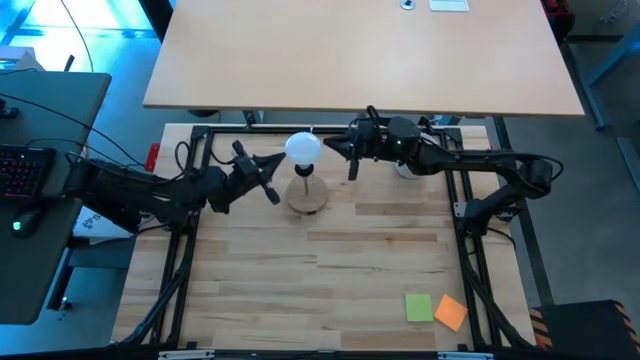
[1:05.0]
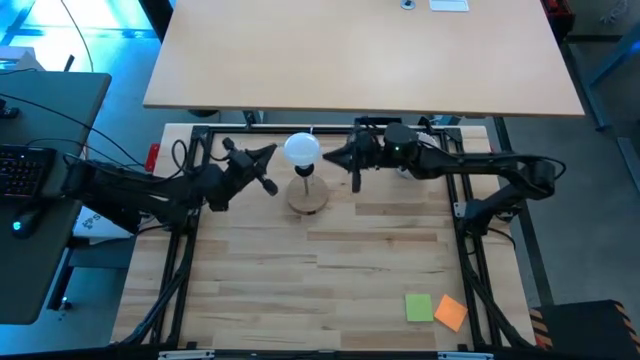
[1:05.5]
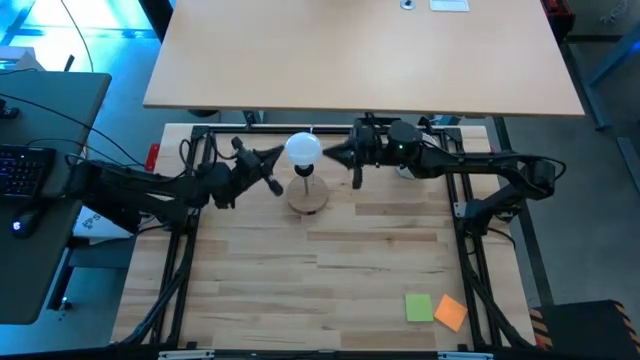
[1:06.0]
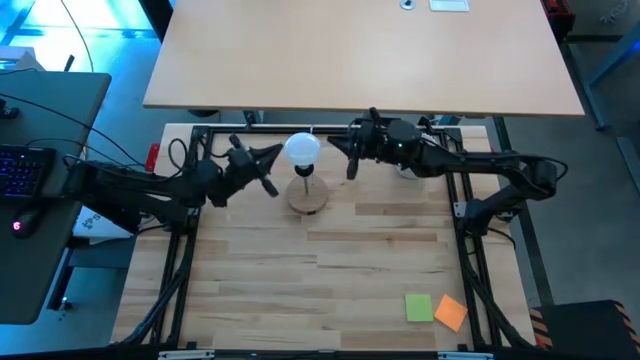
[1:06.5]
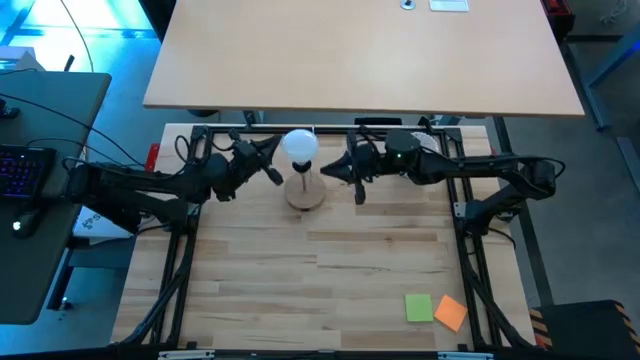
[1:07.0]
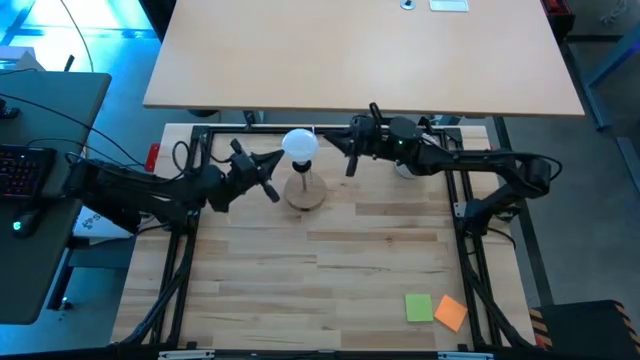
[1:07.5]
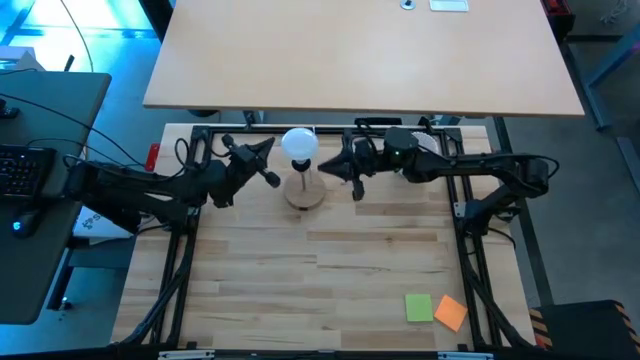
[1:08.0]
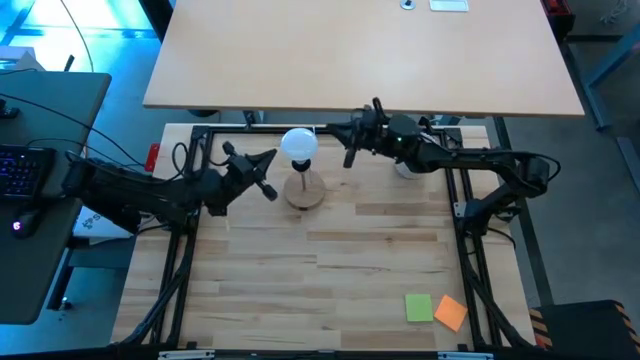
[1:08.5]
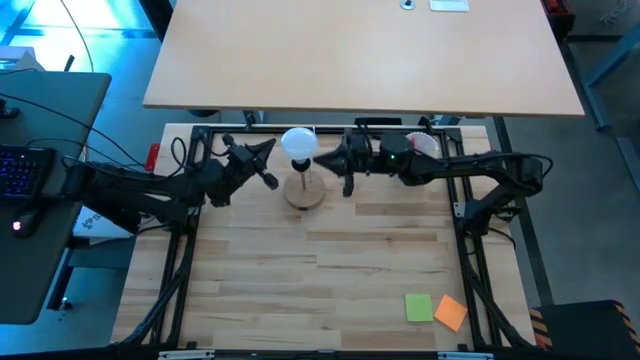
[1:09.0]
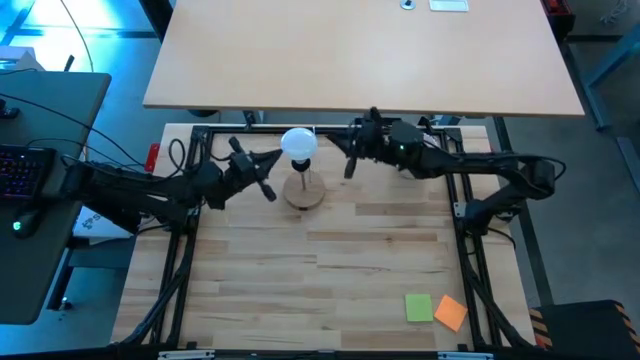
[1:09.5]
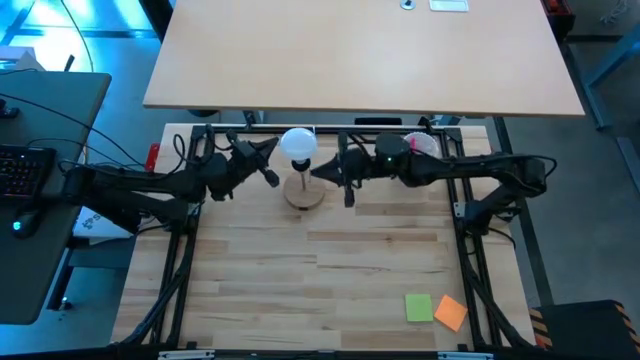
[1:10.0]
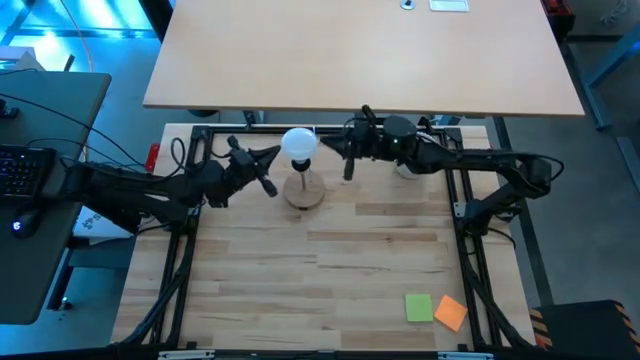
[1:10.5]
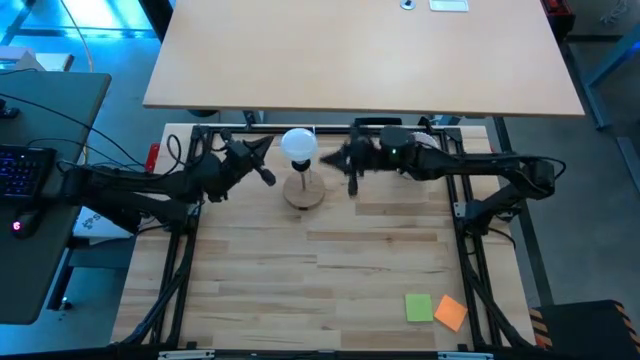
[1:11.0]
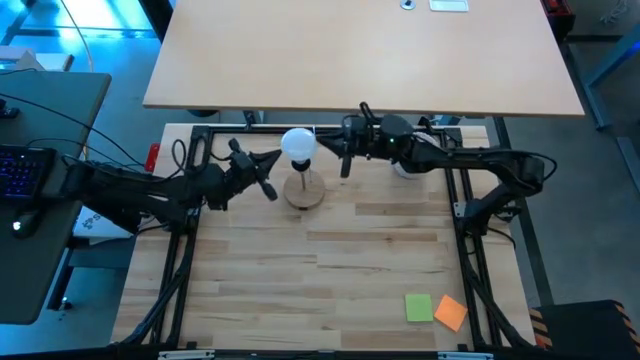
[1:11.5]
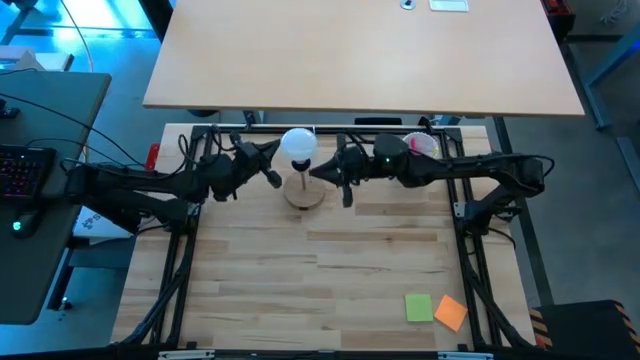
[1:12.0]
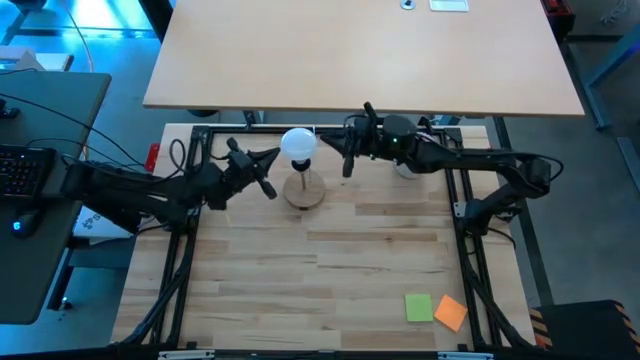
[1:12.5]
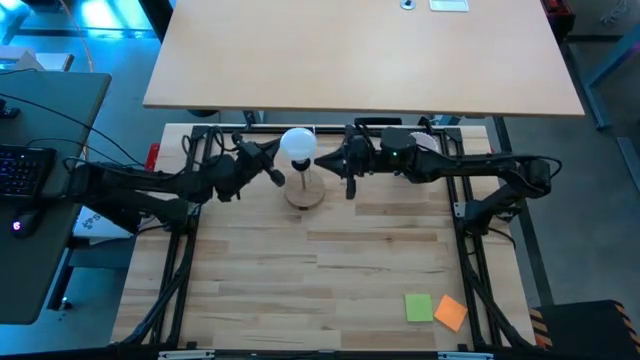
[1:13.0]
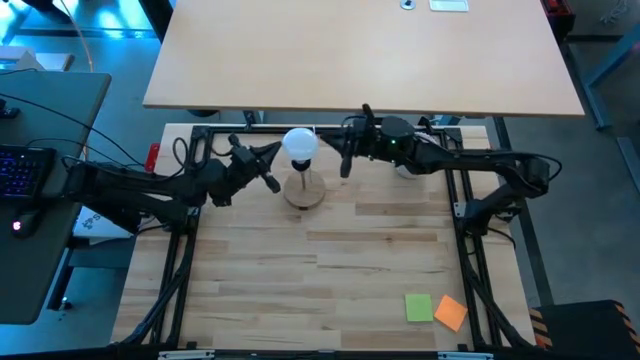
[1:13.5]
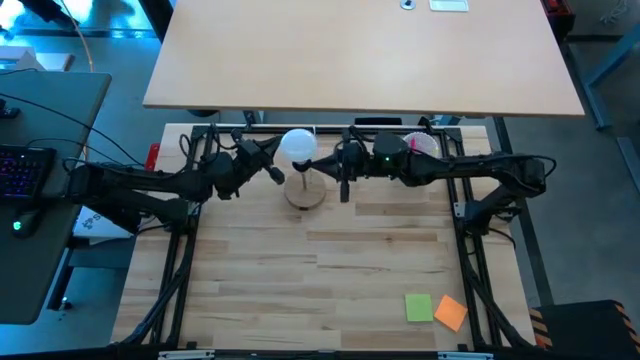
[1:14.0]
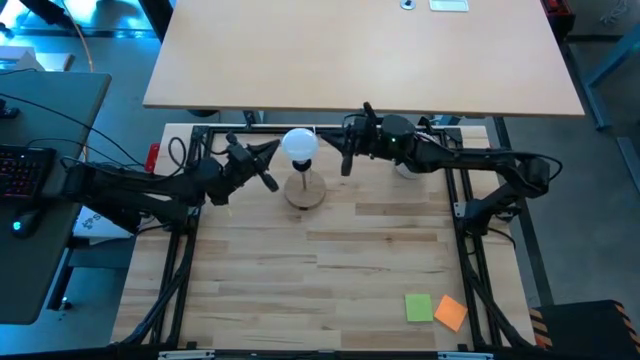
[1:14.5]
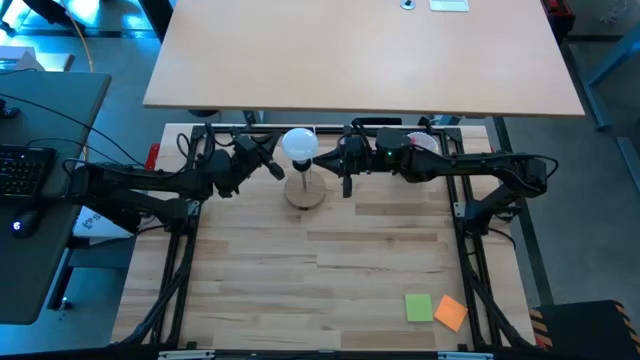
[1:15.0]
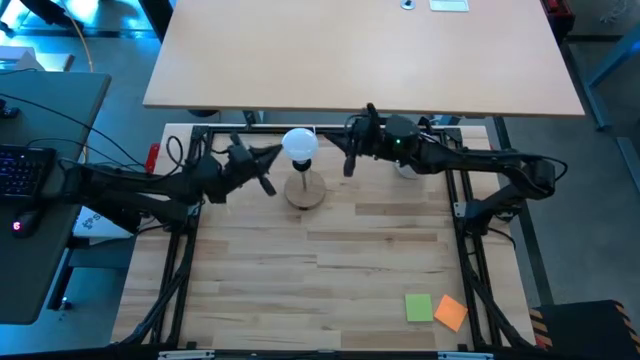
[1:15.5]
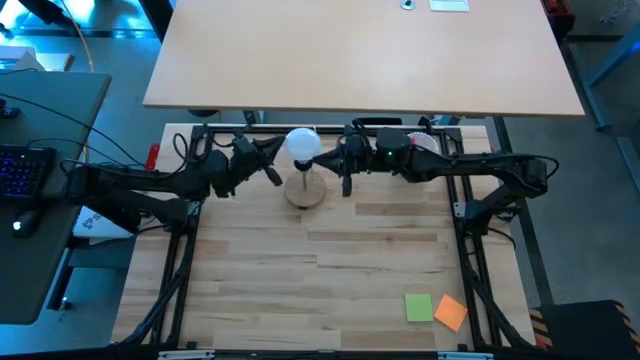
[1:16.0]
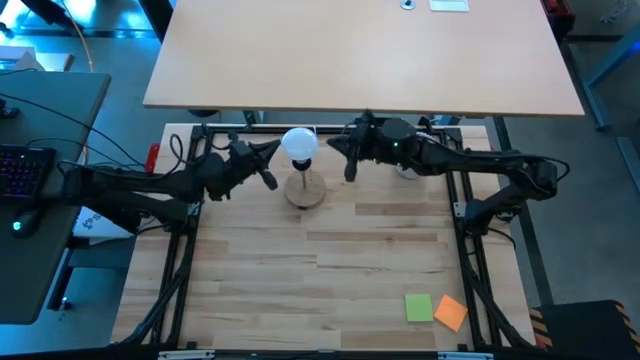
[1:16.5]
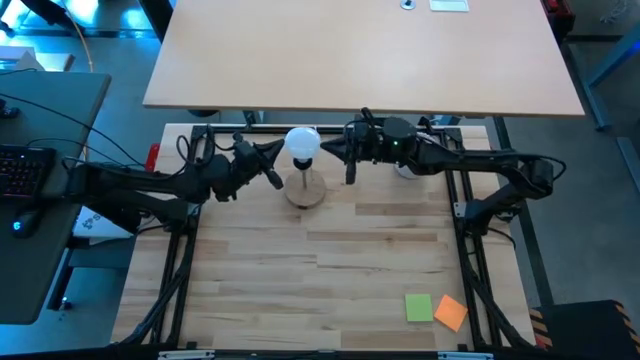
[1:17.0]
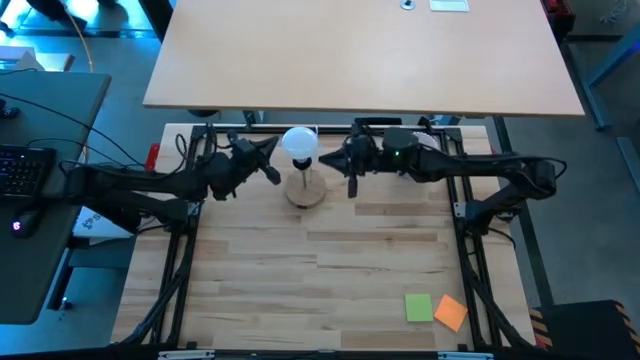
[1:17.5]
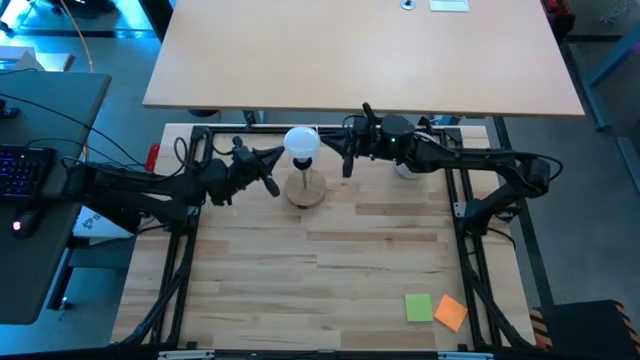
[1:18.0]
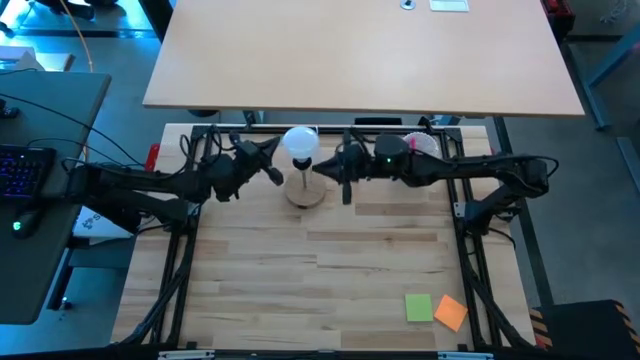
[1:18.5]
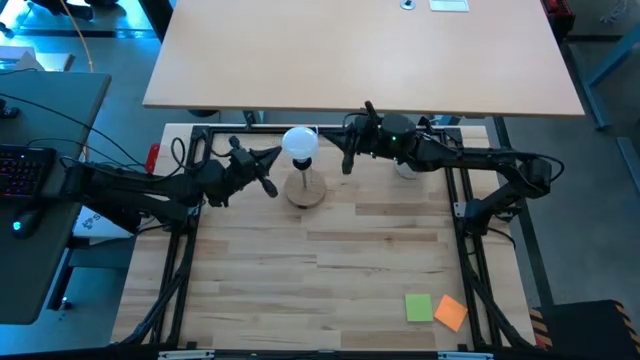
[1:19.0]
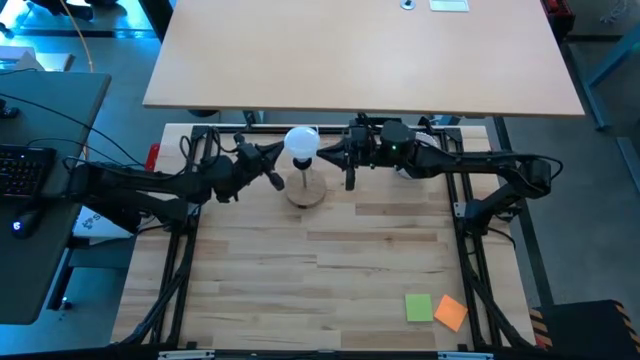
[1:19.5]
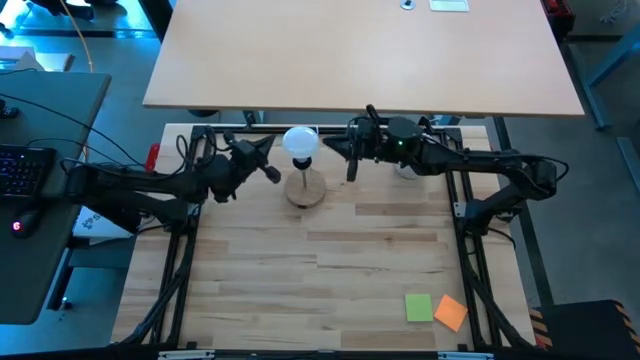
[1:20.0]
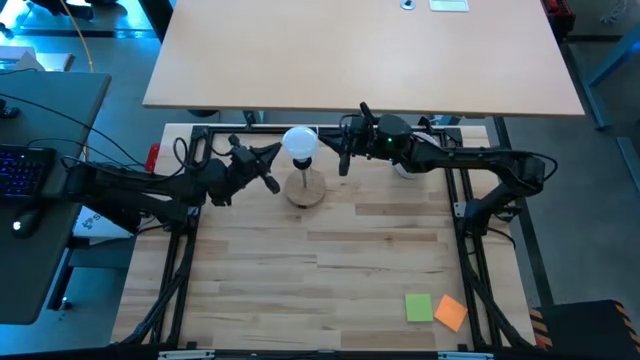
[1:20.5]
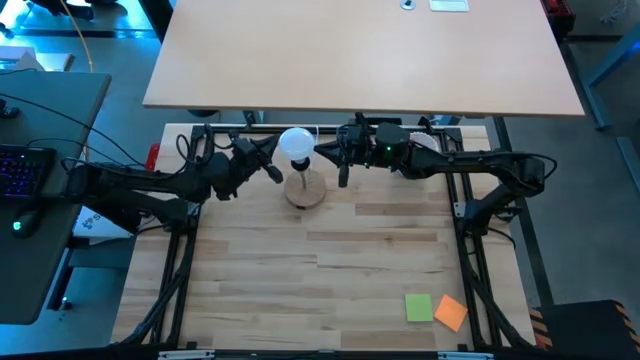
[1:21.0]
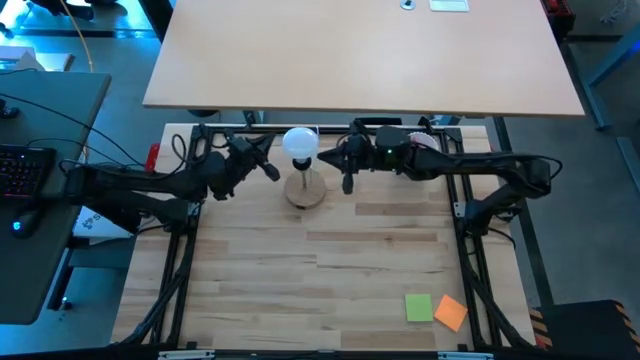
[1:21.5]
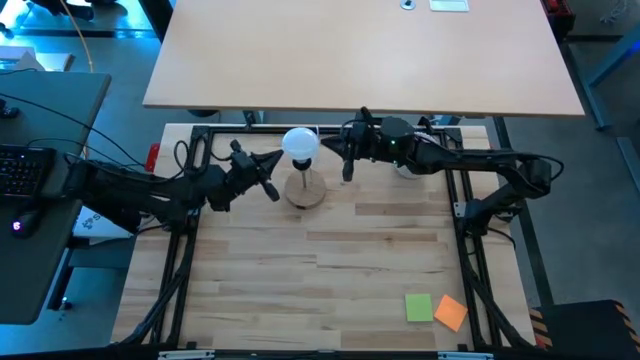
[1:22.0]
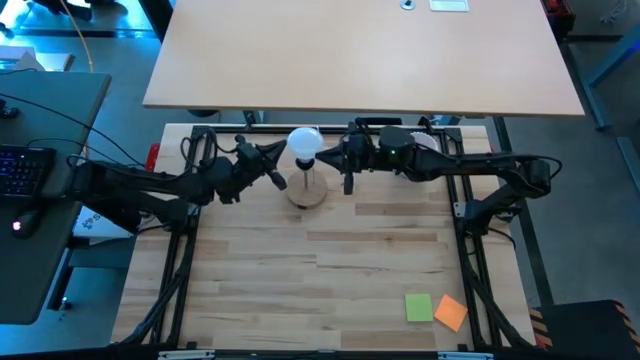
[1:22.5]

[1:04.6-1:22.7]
Task: Screw lightbulb
Insert the lightbulb into the brown lamp

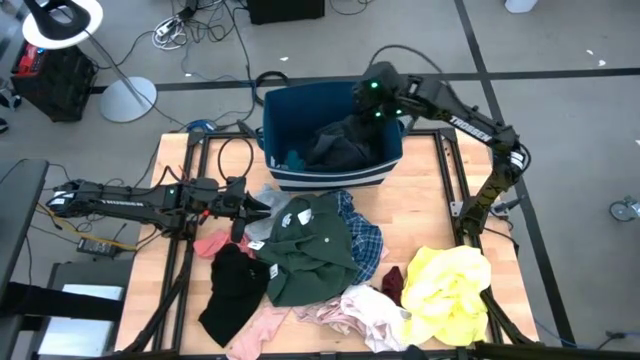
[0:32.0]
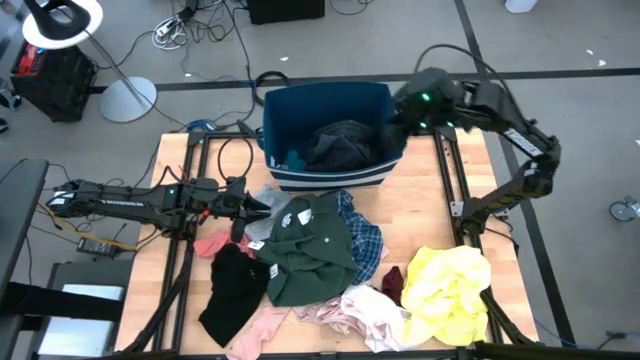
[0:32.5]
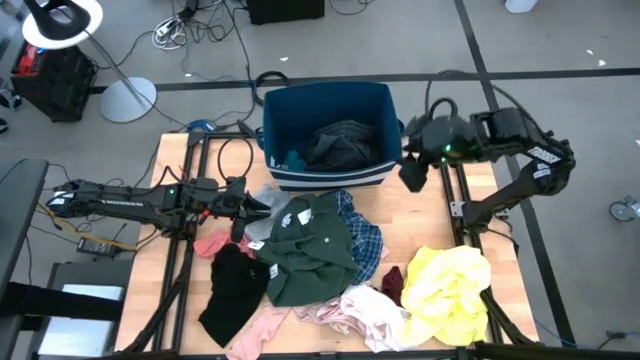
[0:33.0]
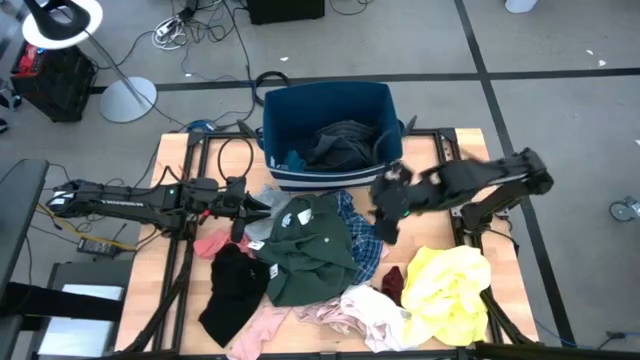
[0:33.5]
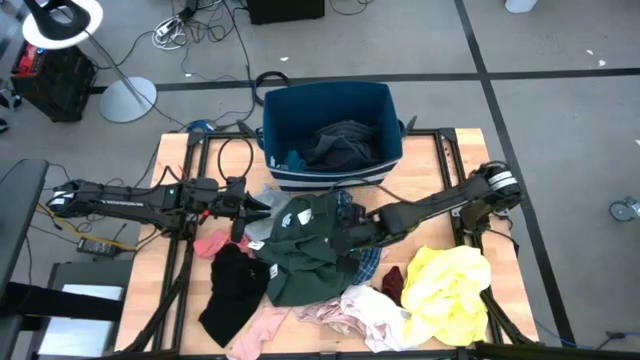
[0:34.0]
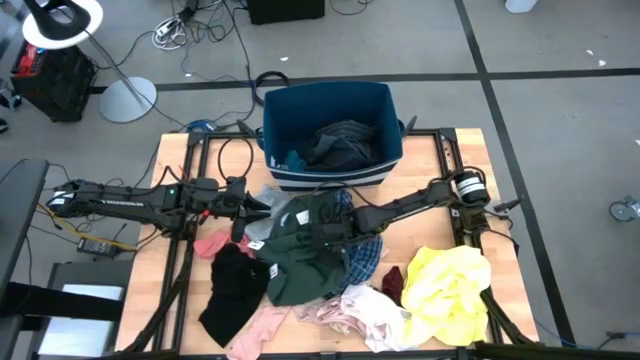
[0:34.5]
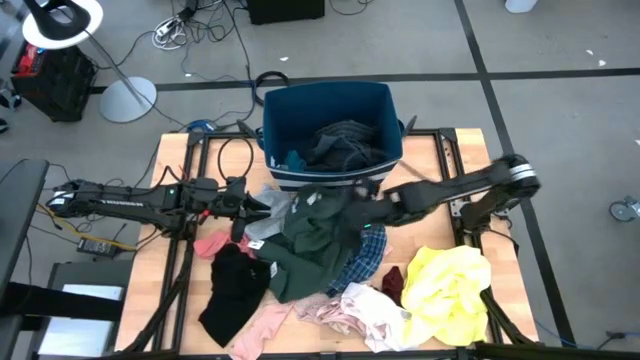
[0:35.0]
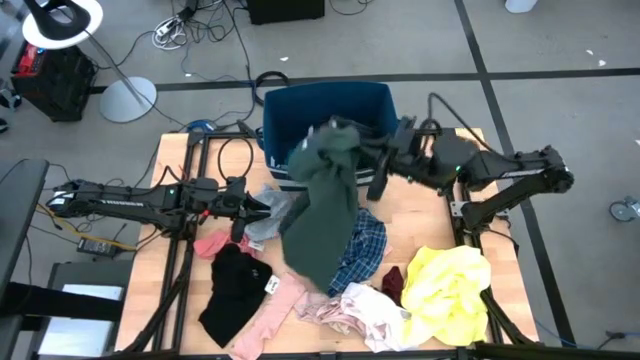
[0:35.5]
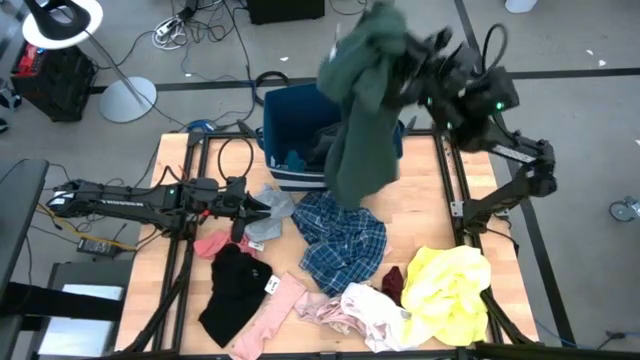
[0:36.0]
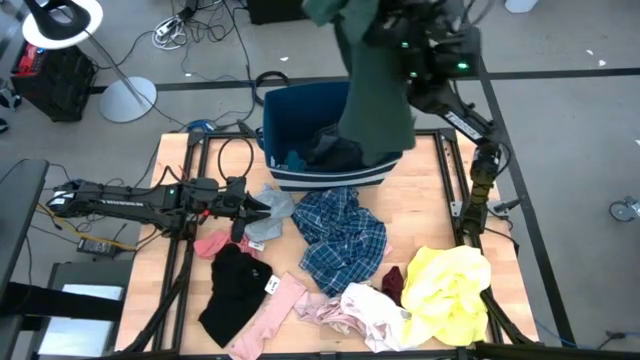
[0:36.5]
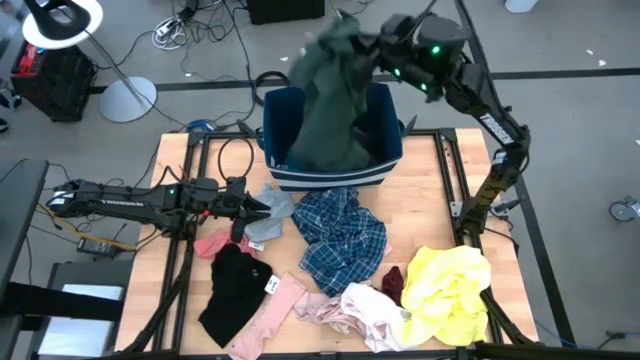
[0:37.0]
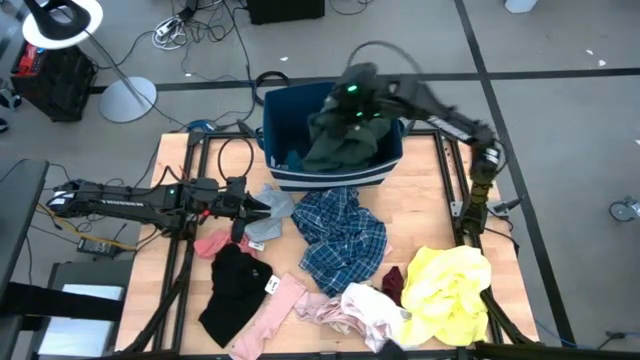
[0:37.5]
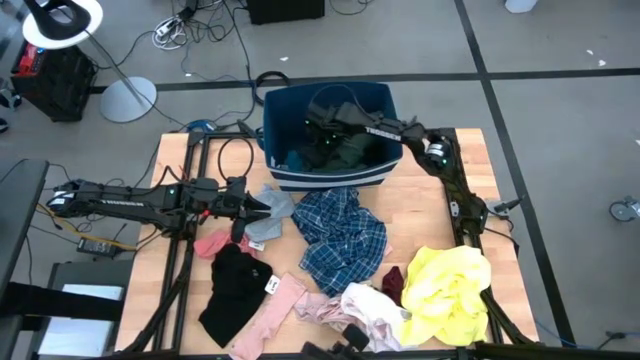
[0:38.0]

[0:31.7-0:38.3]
Task: Sort clothes
Put the green shirt into the blue laundry bin
